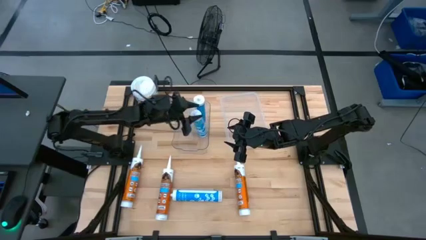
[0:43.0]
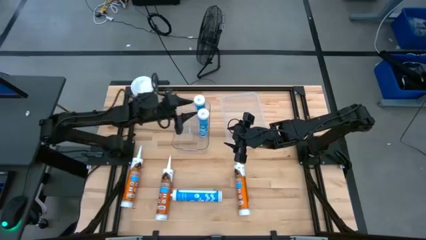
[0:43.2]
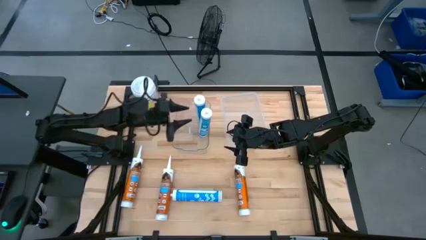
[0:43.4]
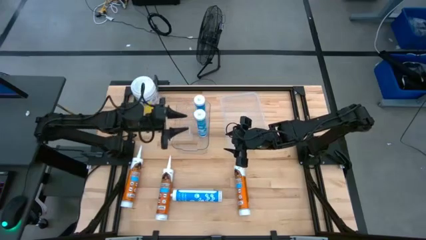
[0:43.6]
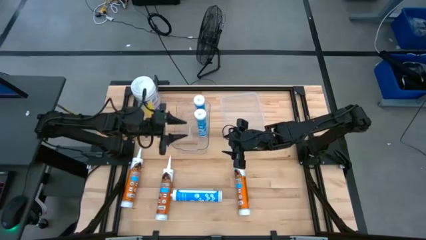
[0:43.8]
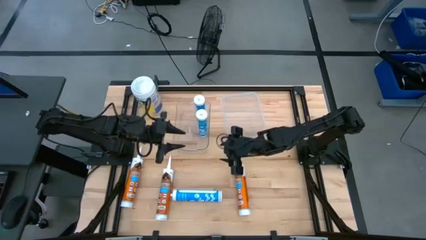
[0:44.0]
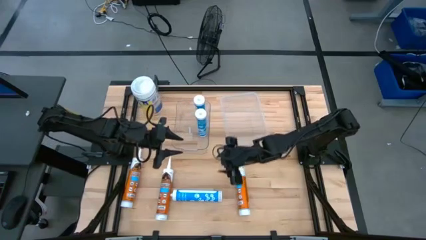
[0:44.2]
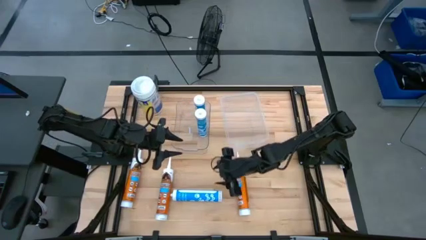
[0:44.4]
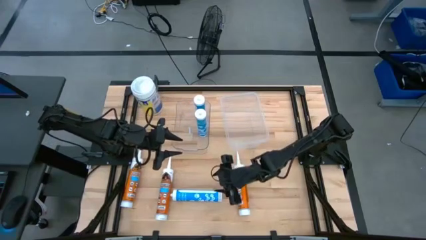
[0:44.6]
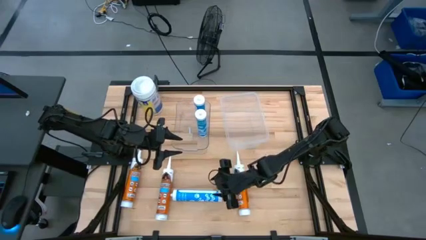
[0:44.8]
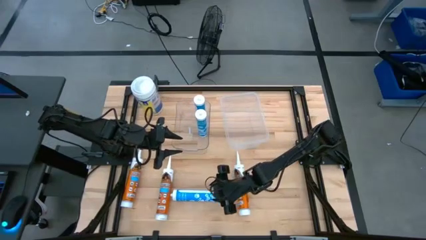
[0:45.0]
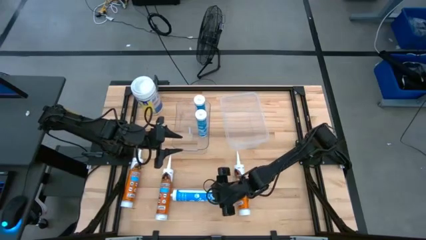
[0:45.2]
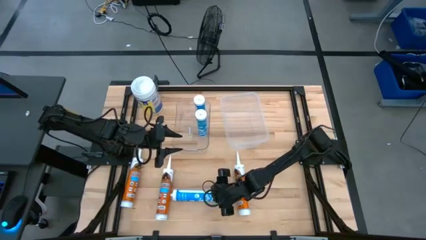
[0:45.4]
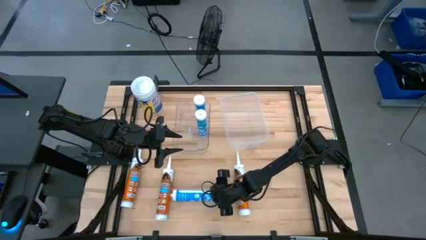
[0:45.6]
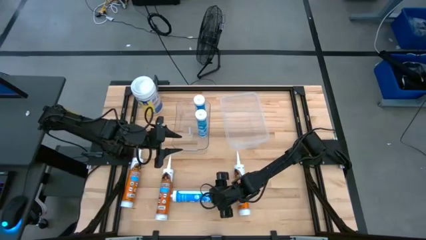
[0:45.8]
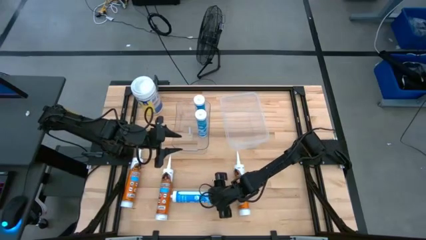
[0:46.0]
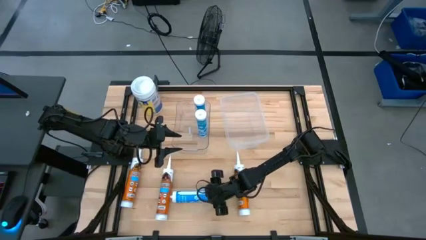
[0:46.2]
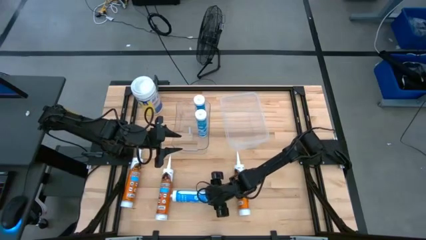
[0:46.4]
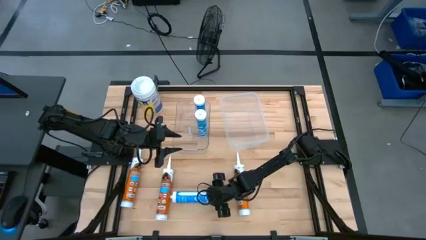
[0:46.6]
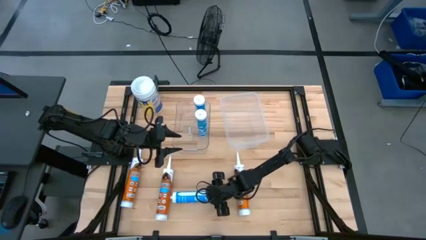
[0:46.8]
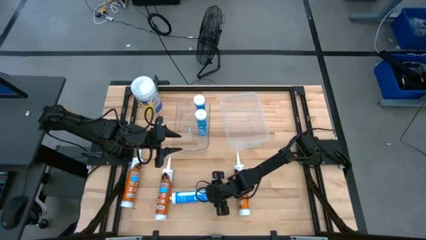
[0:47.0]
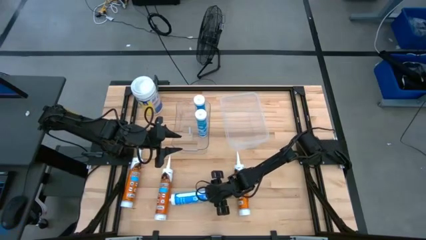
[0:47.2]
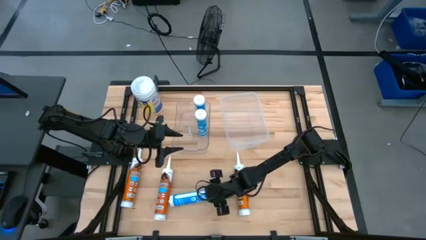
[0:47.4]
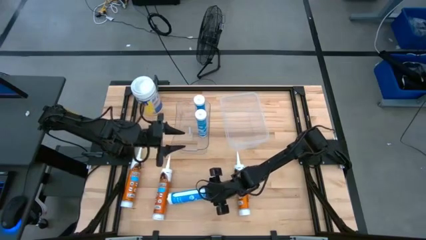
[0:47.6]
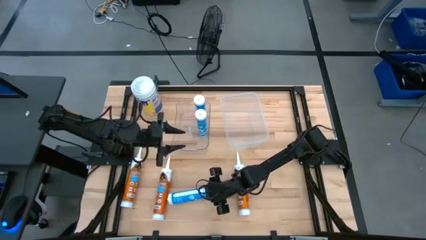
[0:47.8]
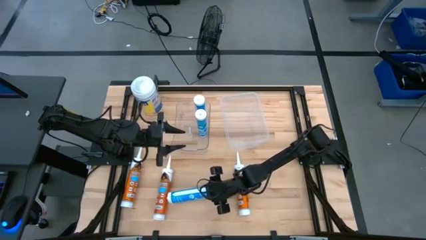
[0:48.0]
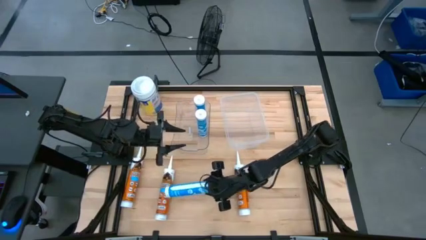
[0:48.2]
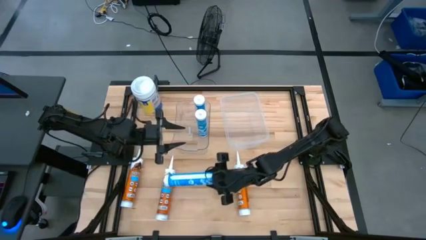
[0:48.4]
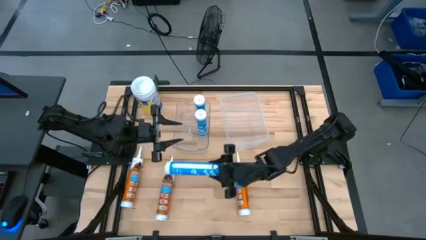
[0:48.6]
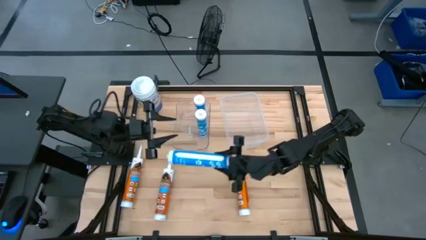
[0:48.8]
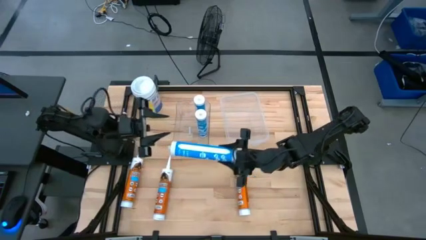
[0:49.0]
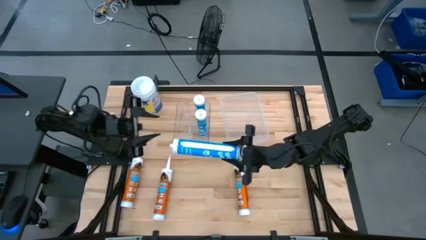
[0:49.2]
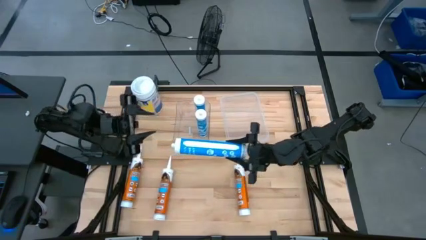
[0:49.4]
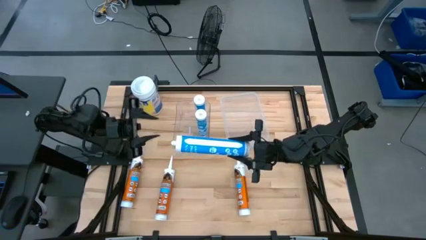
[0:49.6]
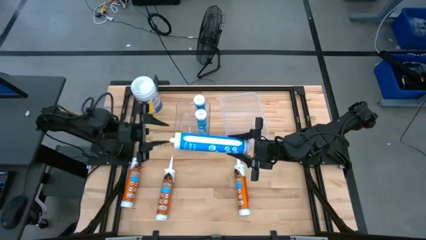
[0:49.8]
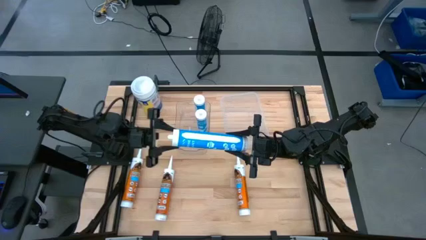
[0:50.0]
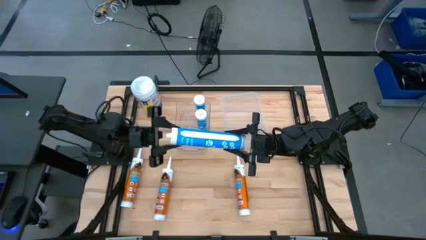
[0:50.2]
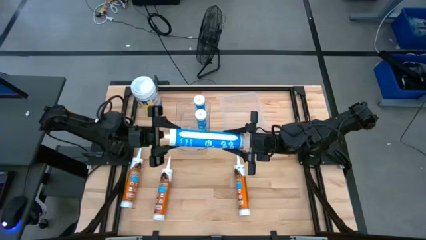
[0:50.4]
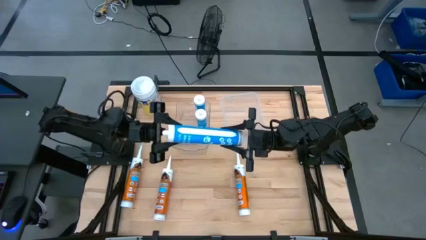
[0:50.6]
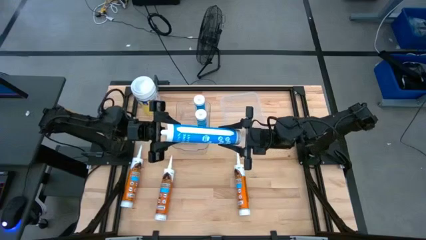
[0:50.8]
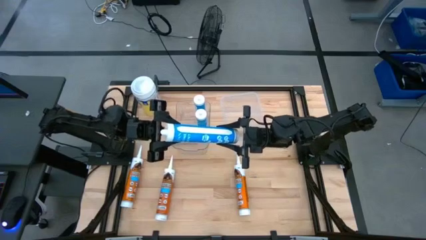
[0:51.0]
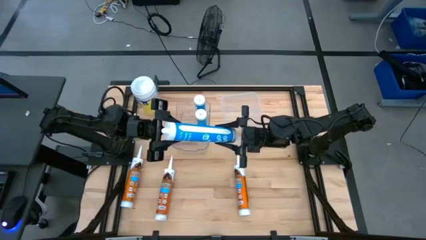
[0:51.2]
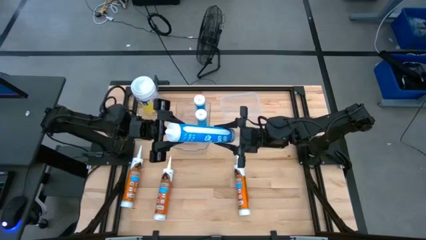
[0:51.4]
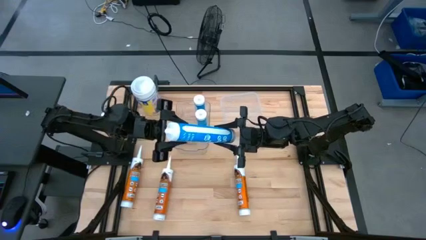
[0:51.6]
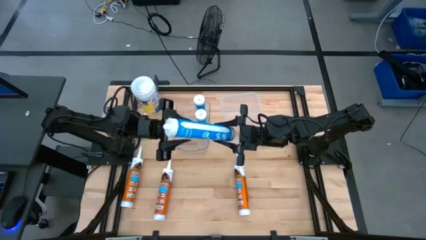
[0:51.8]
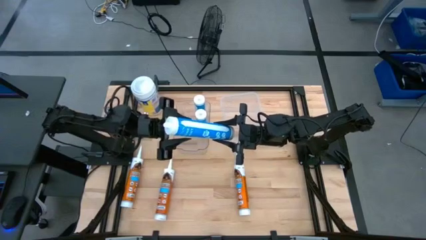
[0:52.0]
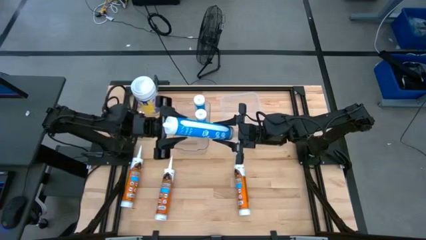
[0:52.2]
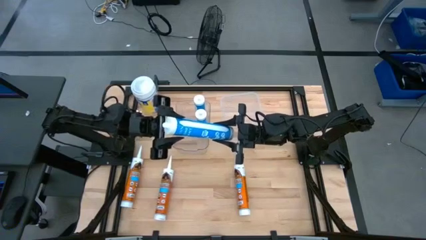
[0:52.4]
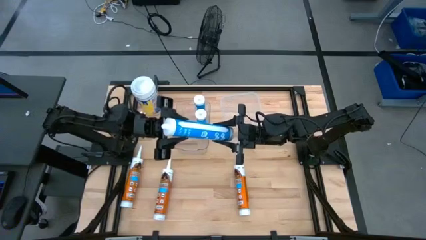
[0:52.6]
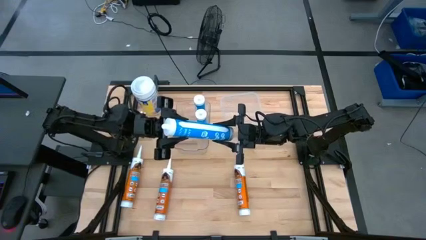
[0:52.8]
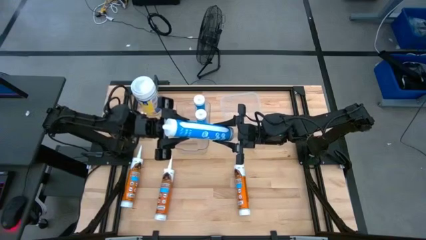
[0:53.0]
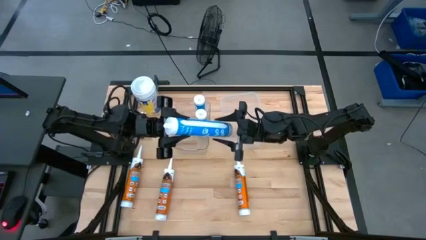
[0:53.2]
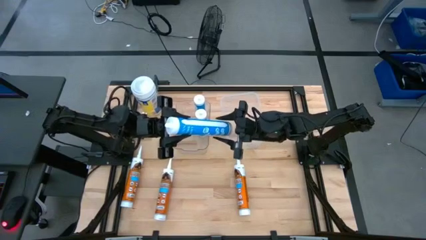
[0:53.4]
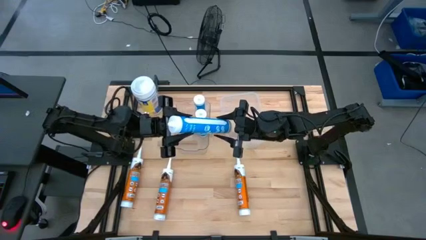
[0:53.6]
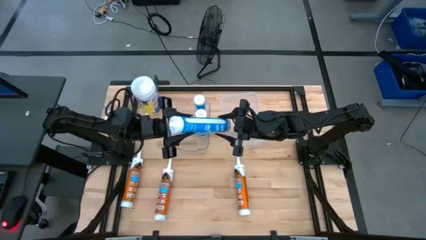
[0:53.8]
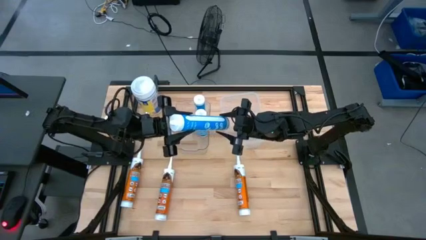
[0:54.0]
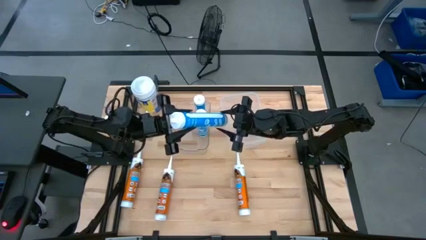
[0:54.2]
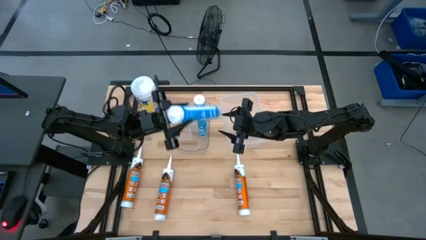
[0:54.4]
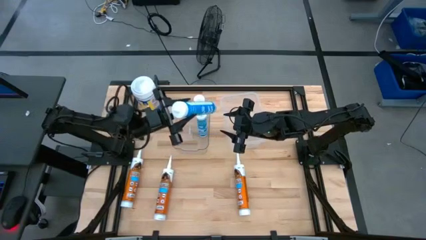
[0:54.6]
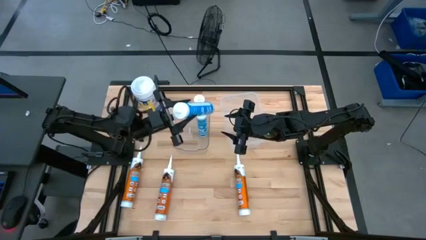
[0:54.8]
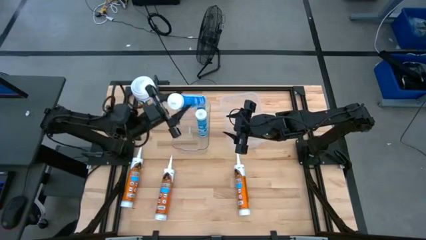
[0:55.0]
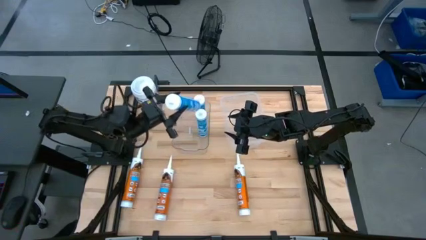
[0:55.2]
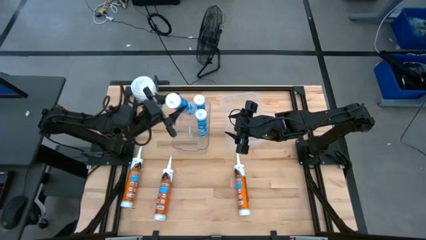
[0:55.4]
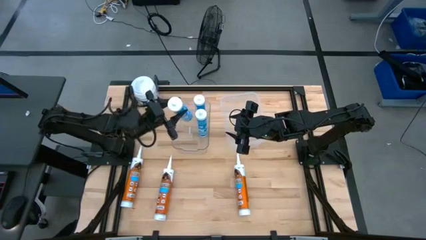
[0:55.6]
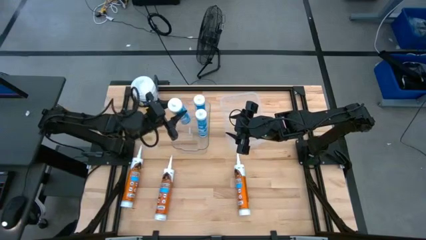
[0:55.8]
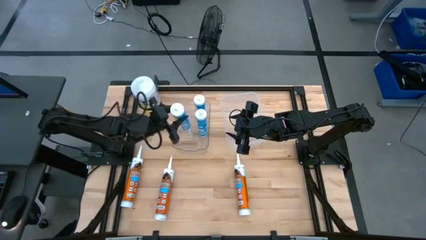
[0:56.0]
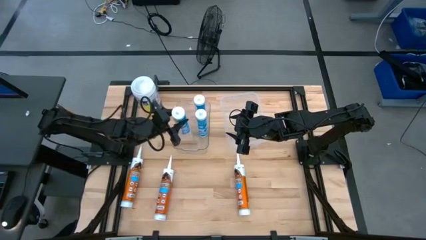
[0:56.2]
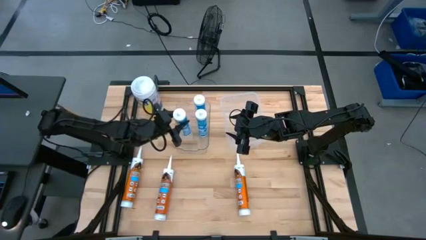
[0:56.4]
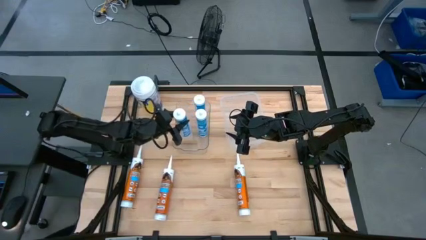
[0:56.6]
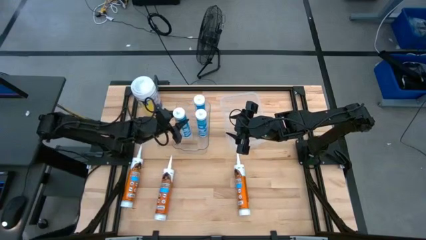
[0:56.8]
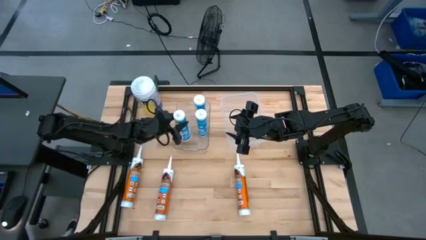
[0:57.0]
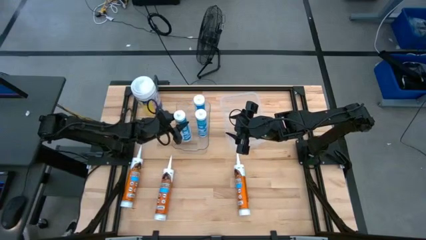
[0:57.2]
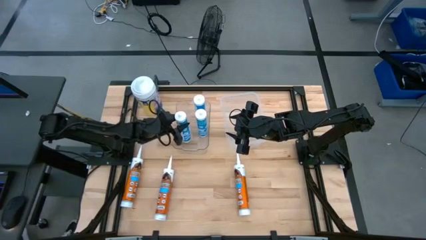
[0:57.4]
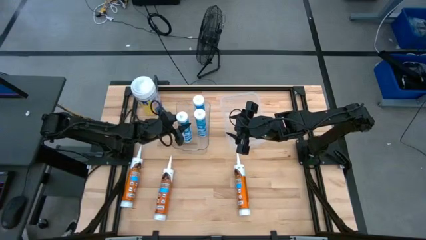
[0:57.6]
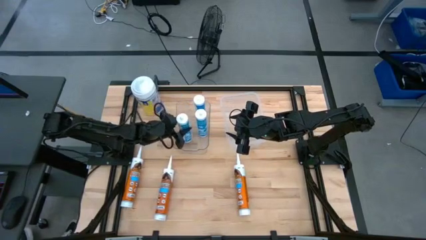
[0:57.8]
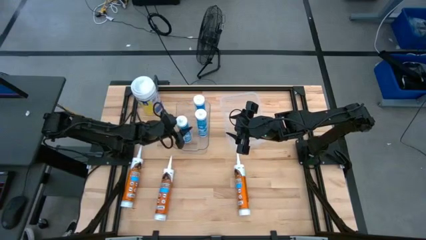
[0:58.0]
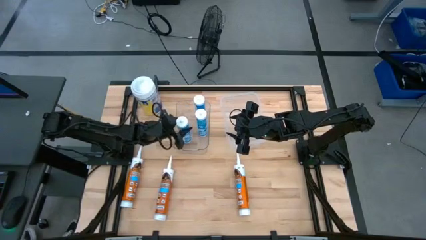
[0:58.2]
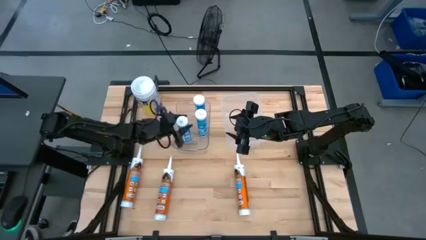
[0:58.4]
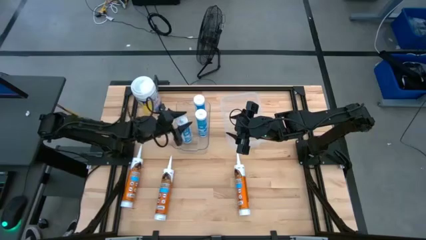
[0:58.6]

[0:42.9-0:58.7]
Task: Pick & place silicon tubes, Sealant and Lysol wipes
Put the blue sealant into the left transparent bin
